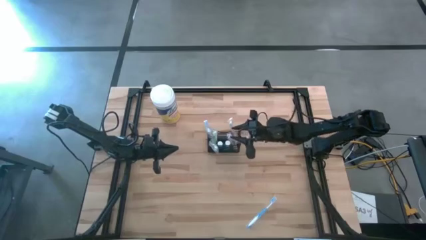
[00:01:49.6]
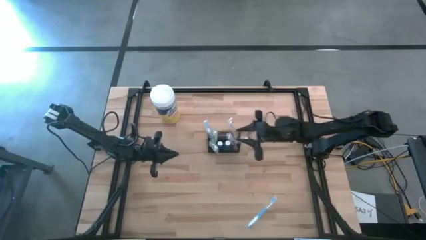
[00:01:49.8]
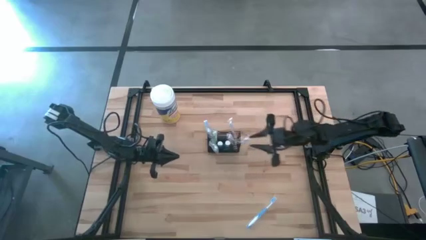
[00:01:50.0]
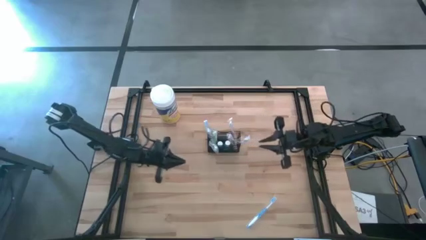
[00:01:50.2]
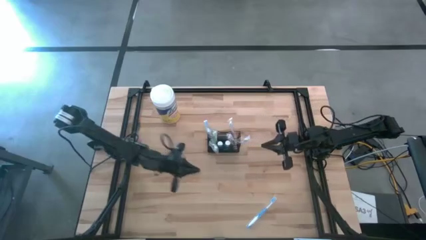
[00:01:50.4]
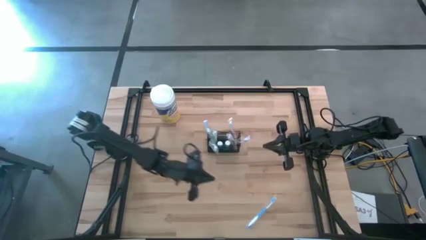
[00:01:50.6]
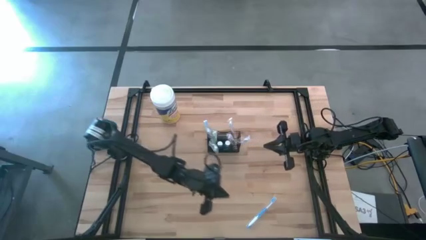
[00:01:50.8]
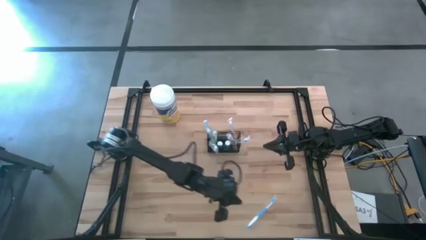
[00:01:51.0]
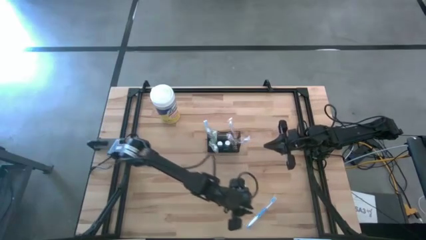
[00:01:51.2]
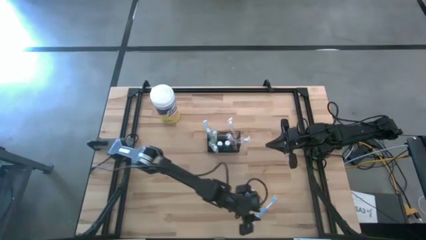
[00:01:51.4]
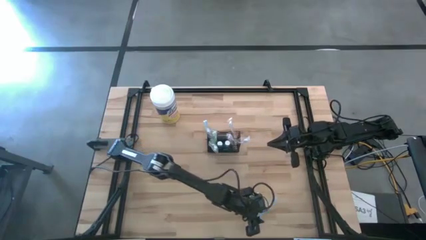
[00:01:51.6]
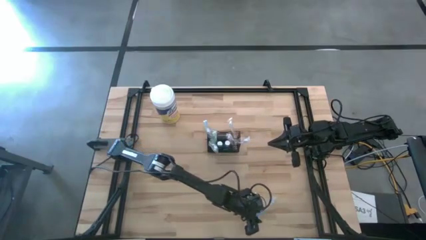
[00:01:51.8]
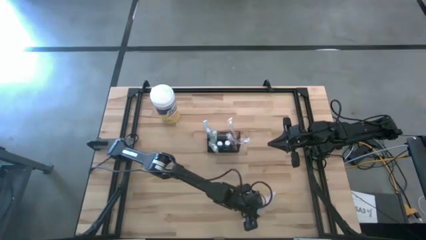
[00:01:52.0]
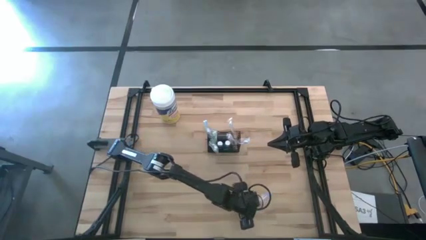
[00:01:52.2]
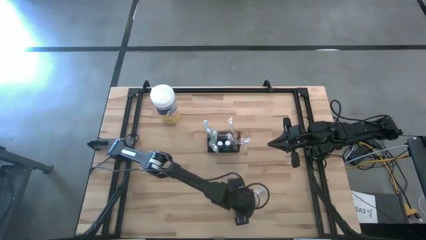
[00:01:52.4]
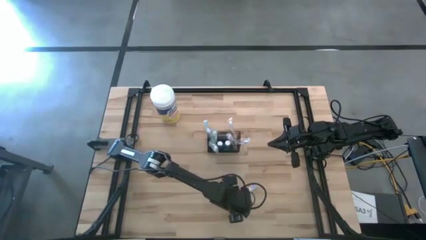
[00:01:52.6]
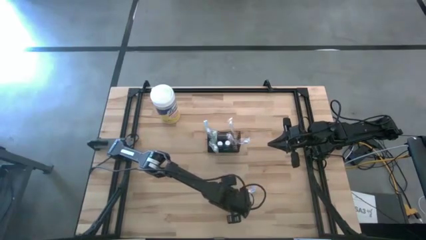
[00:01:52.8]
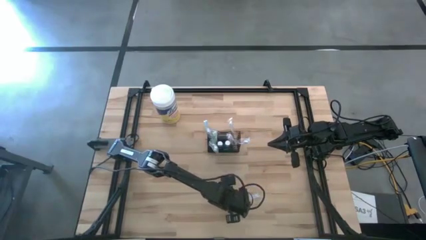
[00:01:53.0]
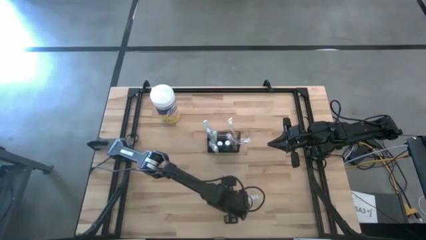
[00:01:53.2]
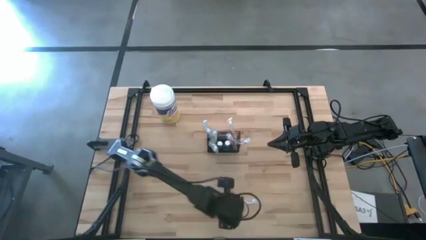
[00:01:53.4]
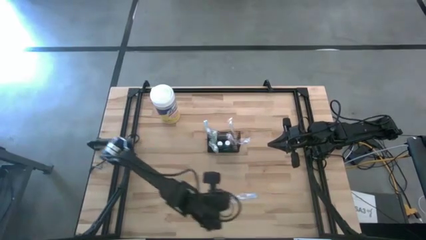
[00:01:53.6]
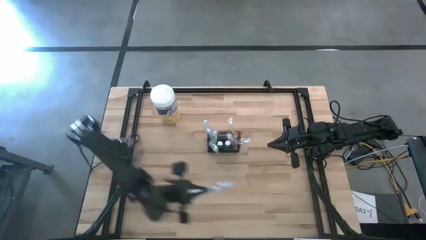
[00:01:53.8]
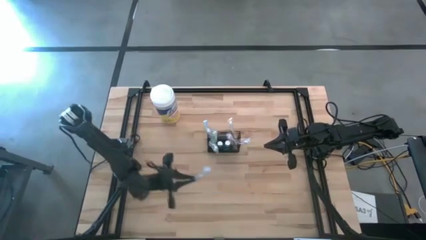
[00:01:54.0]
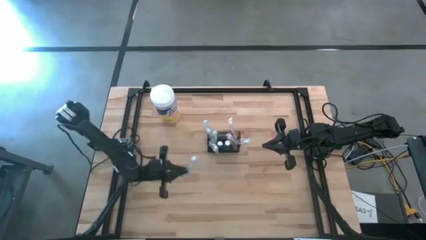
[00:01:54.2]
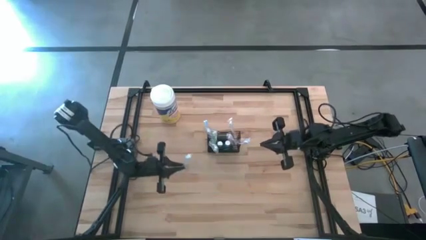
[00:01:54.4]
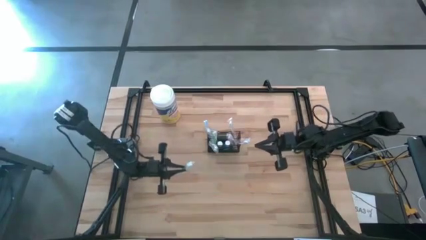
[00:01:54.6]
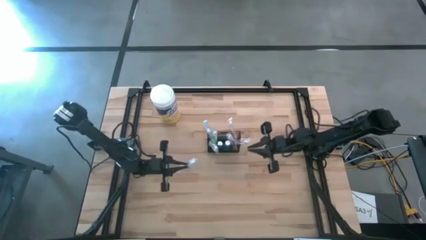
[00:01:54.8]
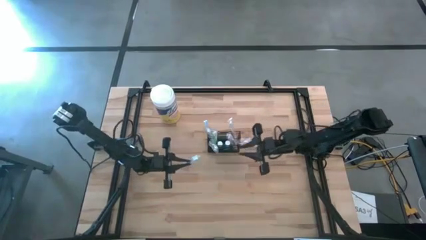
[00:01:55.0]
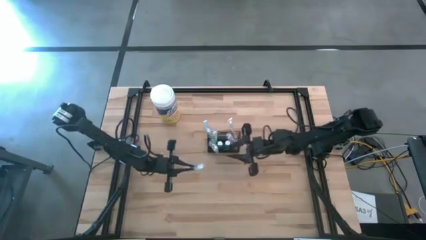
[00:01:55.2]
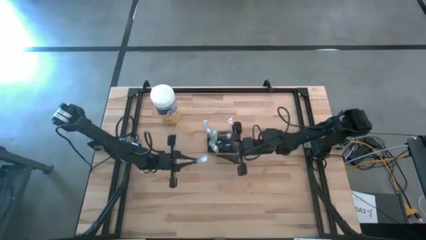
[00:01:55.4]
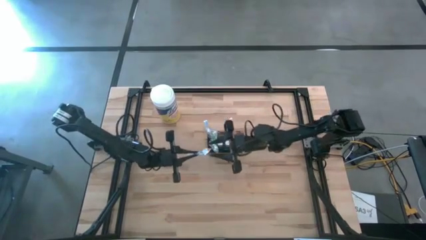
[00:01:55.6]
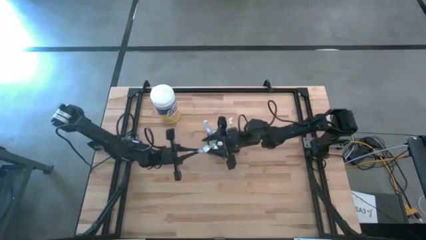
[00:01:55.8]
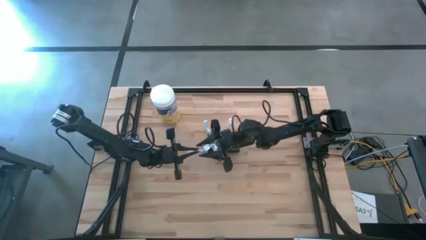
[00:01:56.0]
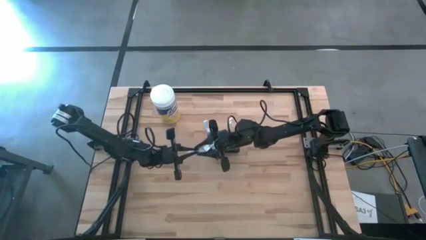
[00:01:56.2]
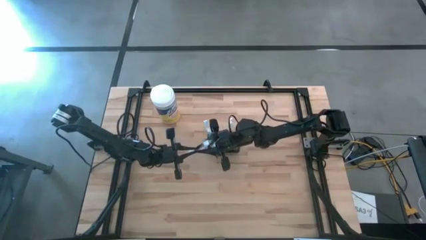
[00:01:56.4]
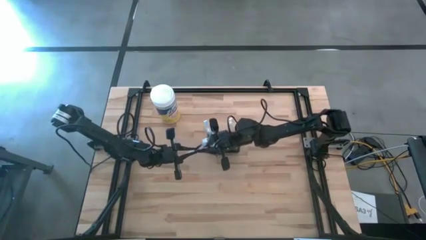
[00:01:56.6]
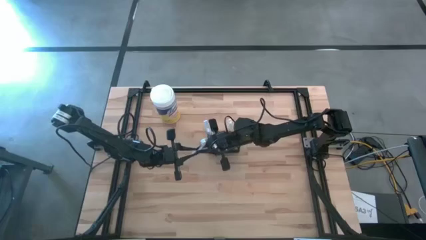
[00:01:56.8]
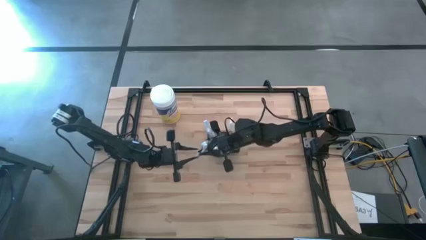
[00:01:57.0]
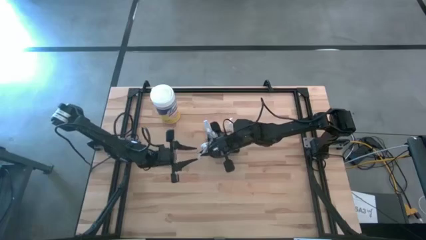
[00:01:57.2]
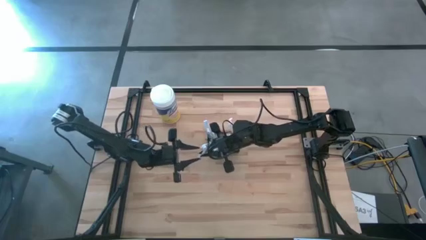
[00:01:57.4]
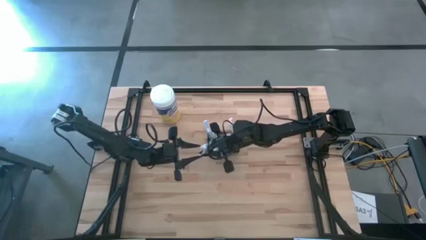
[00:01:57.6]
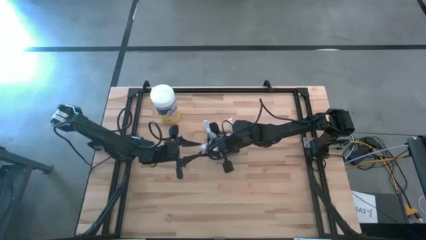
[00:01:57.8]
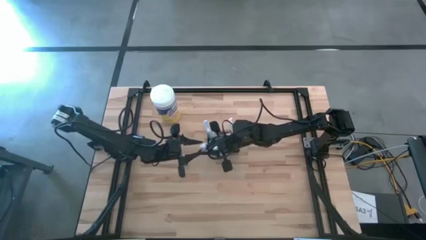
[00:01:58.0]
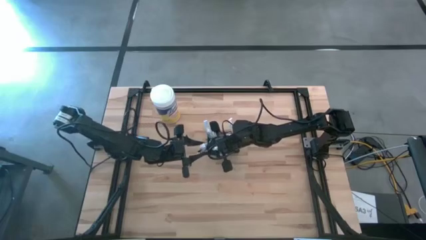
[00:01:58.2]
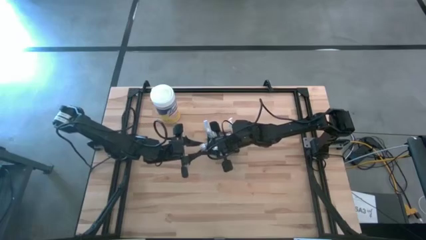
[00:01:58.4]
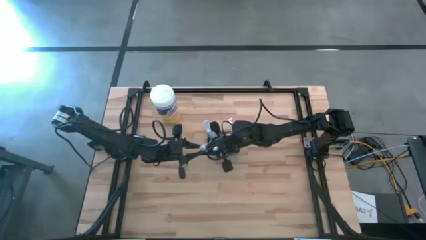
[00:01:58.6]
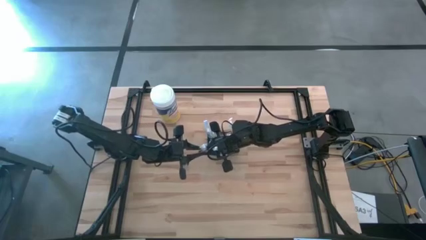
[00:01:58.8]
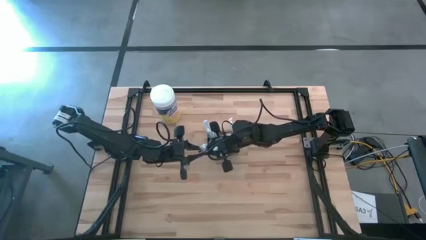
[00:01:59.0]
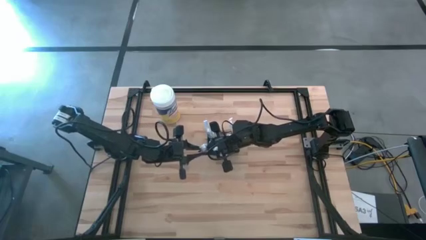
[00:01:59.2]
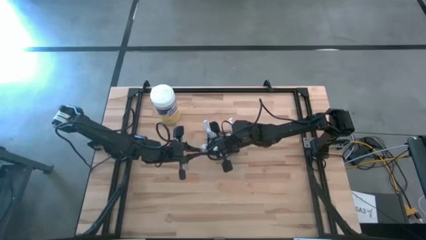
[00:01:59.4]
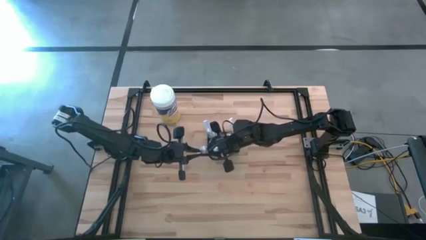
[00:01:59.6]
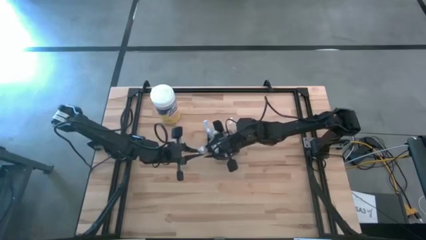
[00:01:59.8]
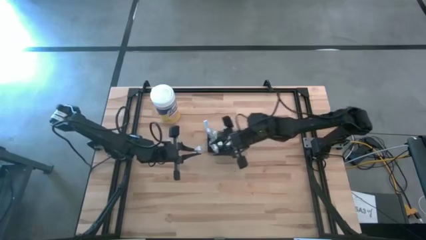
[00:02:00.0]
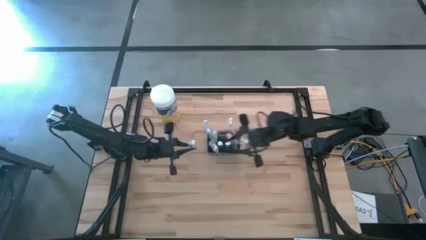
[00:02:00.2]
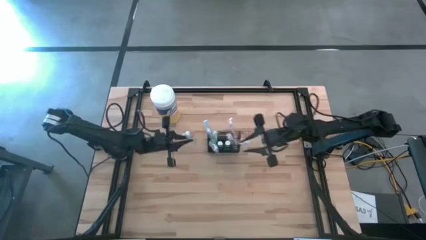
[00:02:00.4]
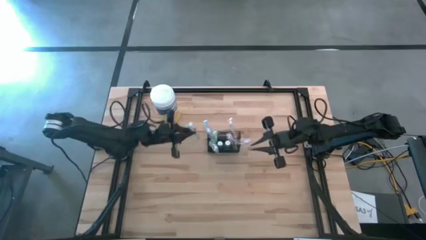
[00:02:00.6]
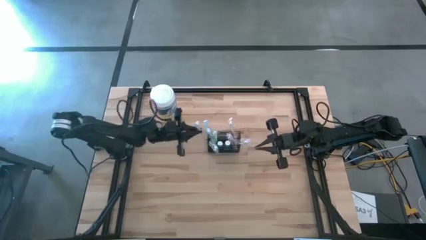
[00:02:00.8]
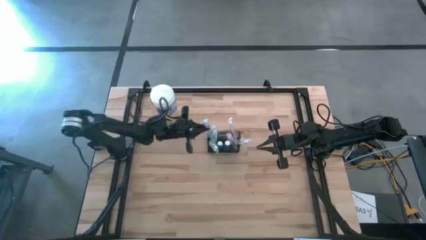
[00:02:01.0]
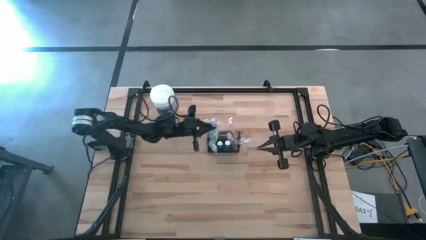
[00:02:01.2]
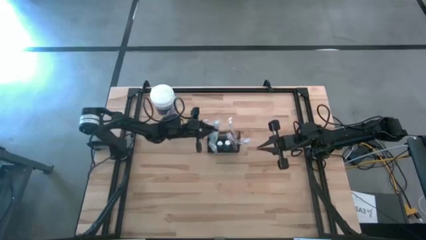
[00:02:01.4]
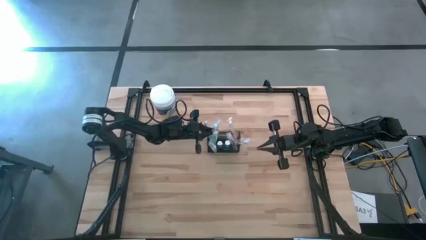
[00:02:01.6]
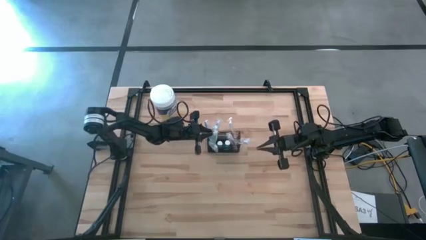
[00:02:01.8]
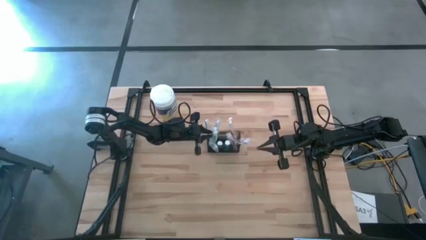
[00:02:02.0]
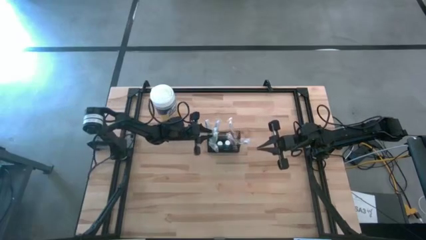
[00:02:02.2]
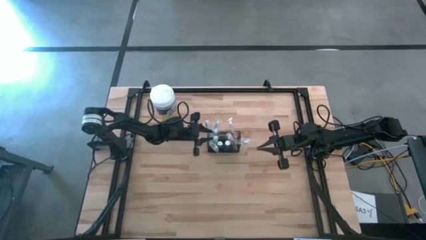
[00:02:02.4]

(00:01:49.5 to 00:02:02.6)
Task: Pick & Place toothbrushing station
Put the blue toothbrush into the black mesh organizer
